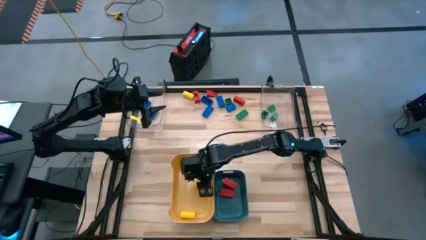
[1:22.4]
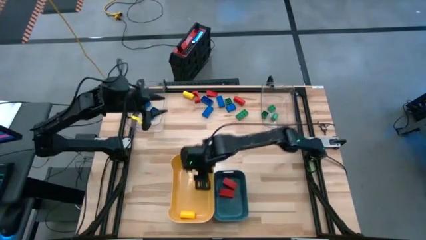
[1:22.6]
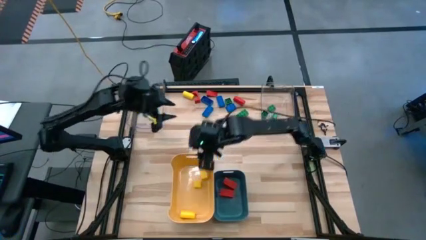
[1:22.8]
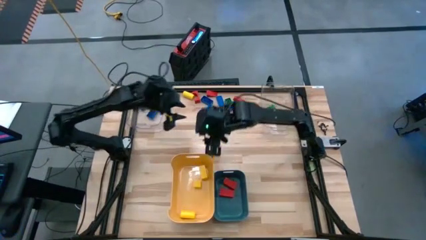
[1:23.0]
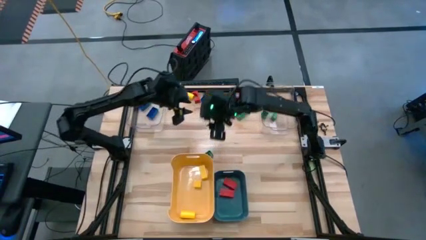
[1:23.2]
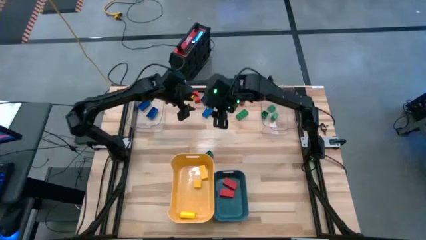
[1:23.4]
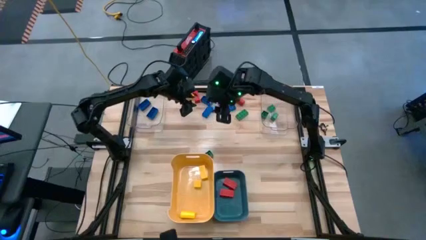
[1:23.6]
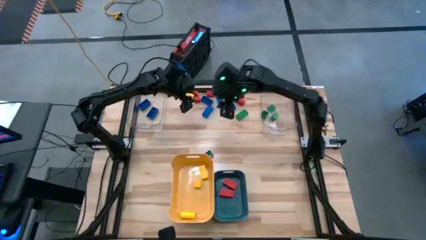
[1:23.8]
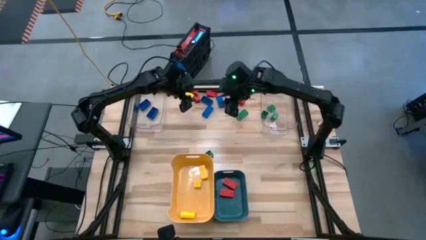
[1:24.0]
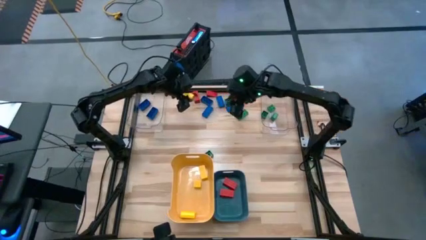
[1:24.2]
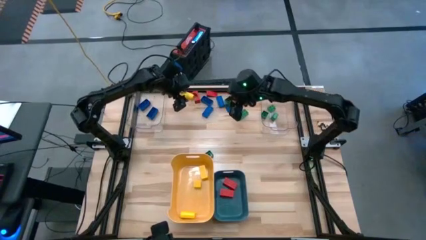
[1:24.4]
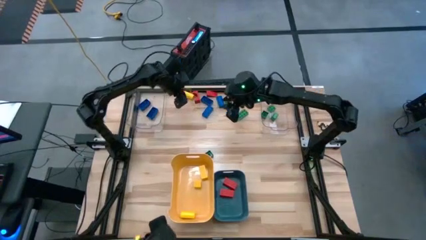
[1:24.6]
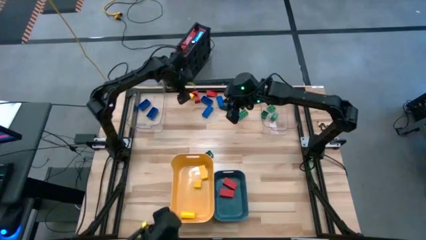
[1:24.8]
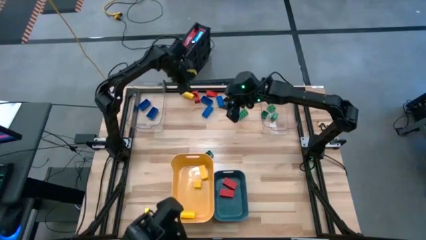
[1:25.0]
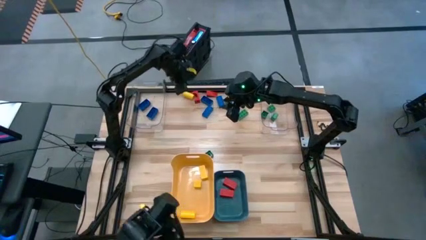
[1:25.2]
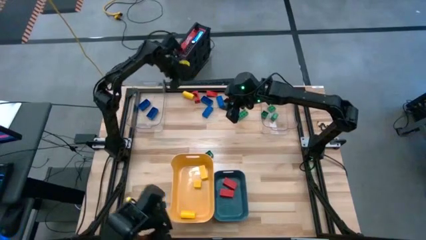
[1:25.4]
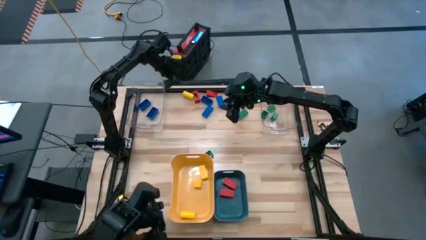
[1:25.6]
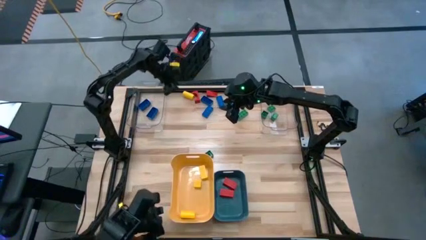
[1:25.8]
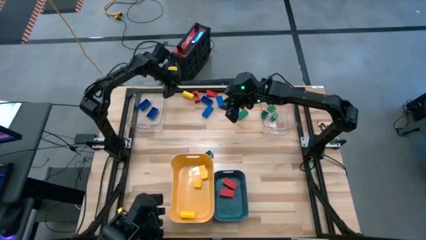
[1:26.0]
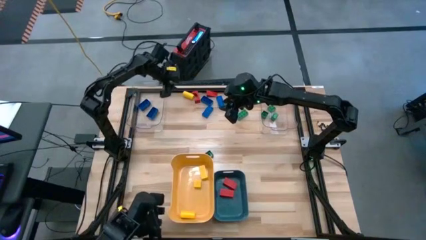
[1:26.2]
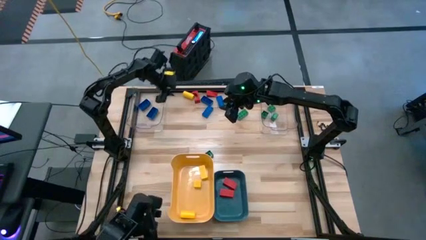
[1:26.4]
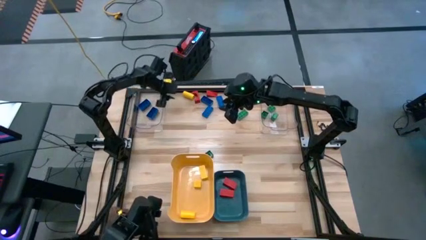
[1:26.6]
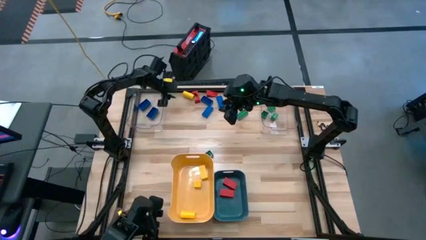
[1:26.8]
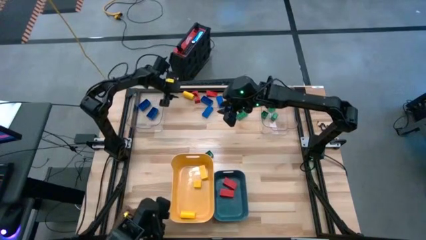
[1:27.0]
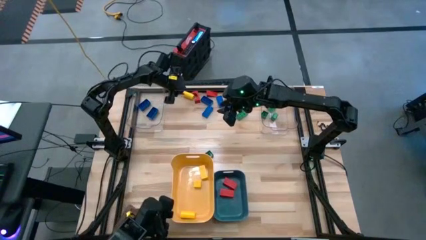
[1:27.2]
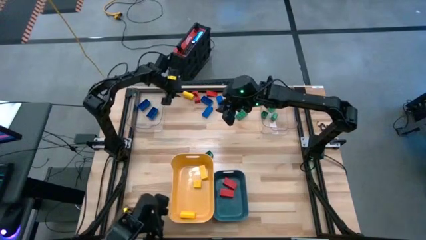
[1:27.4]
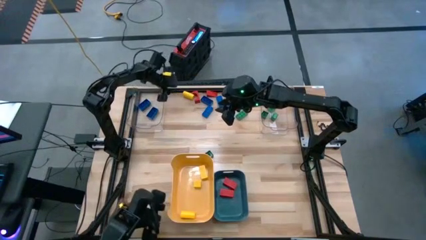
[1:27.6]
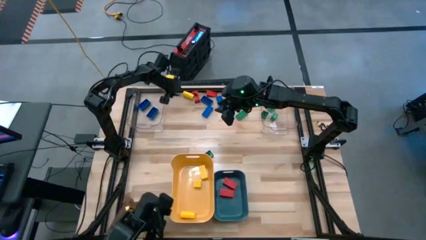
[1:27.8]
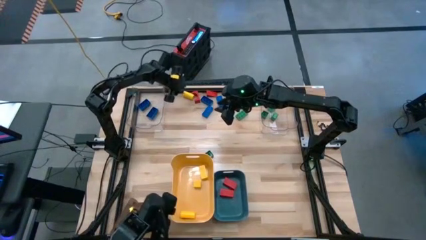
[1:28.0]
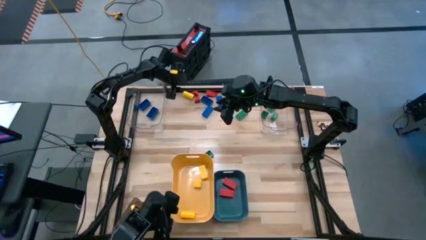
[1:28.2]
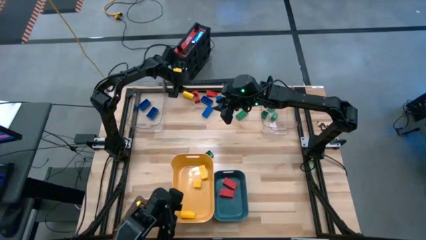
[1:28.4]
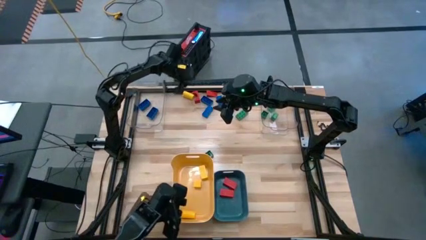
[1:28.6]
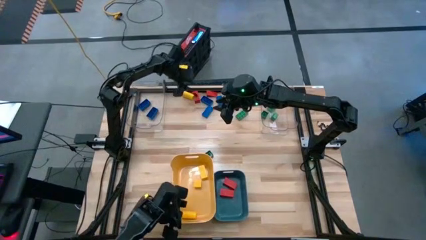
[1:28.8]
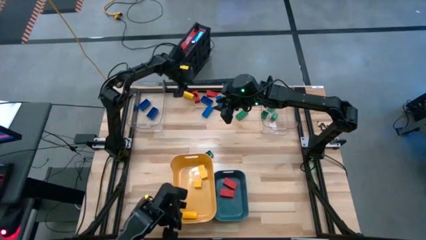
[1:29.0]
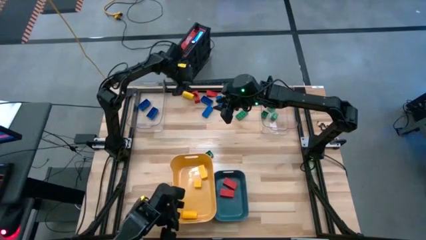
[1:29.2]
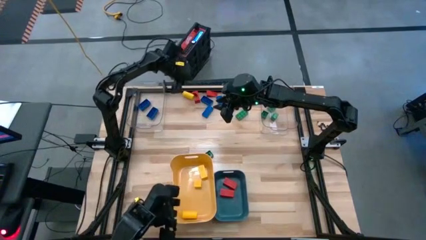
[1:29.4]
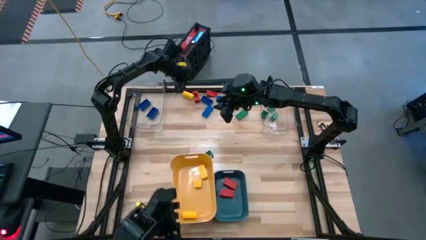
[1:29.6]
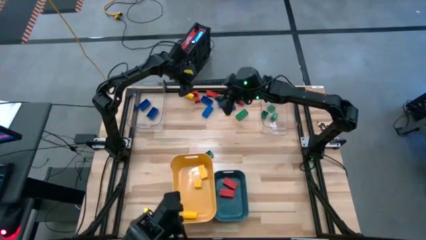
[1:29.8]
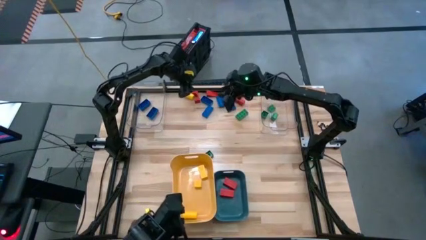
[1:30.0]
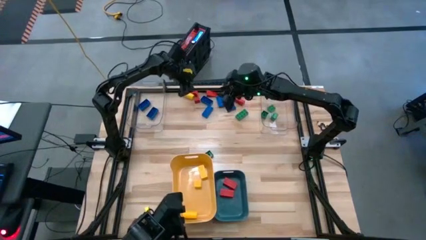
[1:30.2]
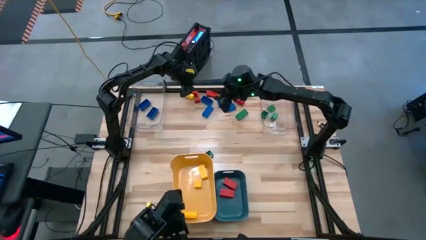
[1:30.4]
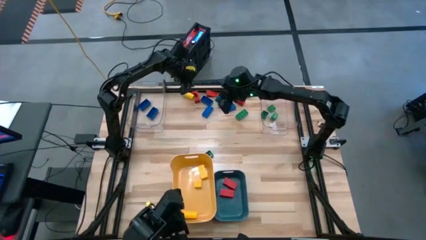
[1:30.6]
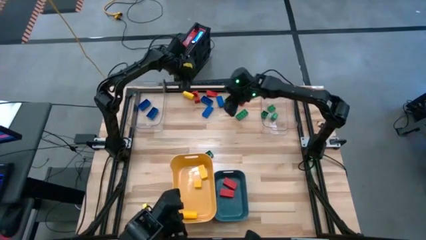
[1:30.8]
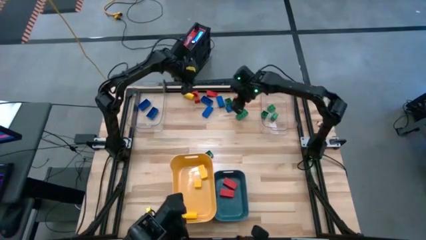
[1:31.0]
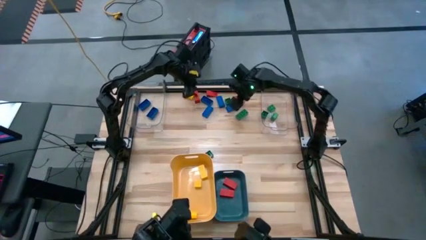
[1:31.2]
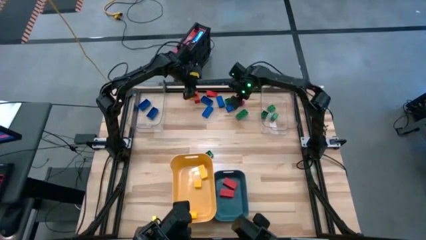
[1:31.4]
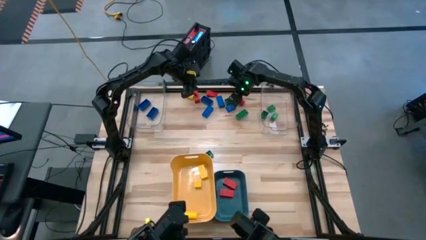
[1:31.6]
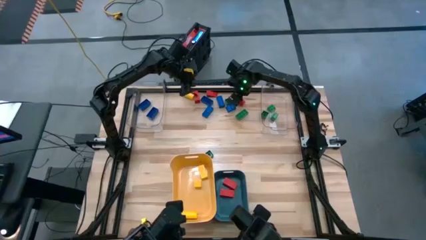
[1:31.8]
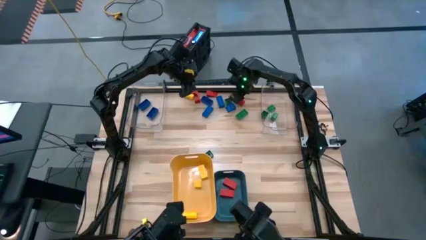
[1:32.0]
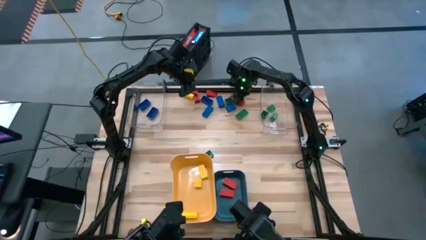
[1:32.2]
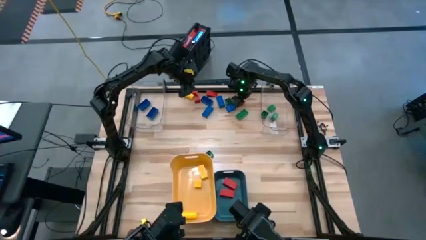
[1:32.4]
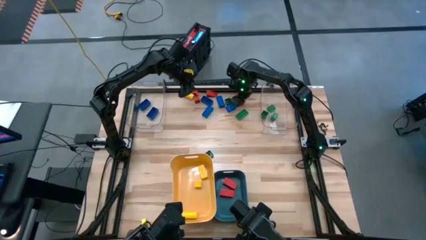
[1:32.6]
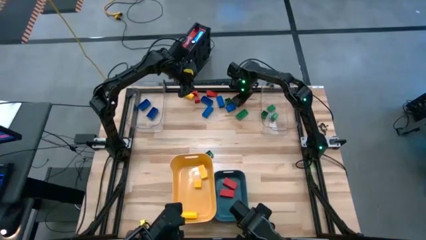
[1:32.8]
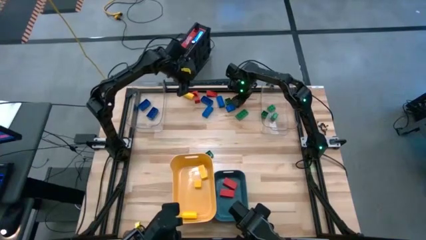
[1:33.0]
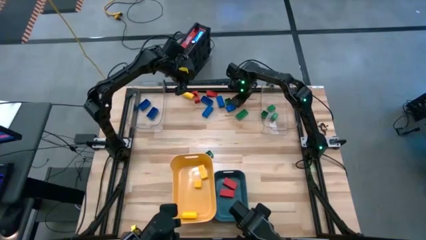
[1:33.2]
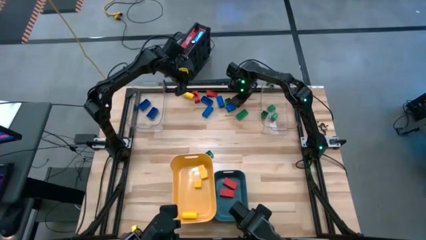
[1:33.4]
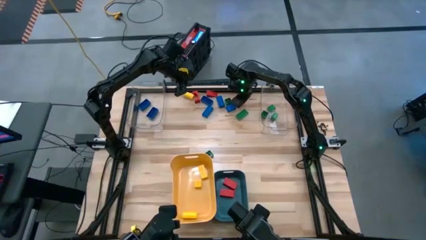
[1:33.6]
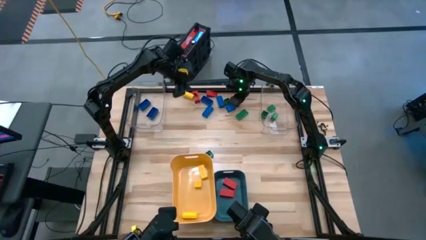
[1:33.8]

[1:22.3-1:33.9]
Task: Sort blocks
Put the red block into the blue bin

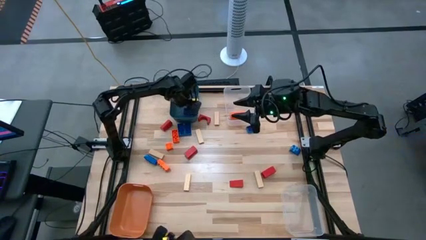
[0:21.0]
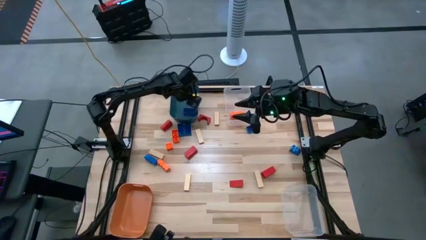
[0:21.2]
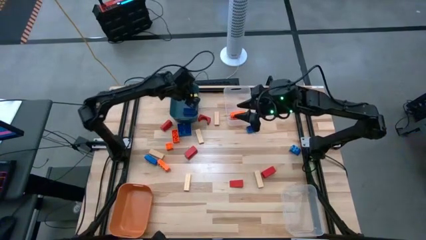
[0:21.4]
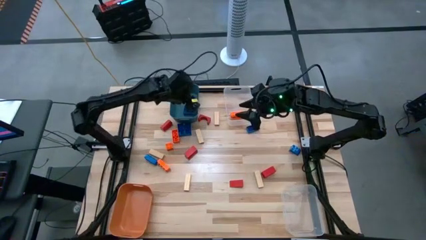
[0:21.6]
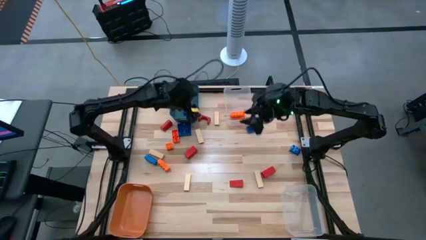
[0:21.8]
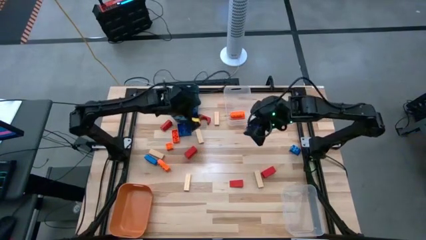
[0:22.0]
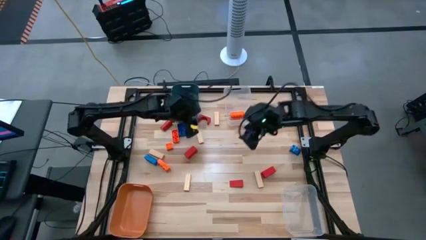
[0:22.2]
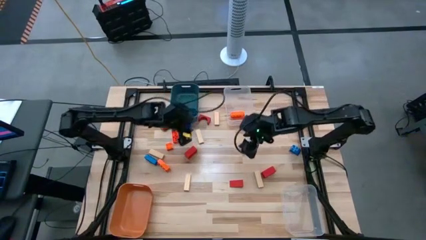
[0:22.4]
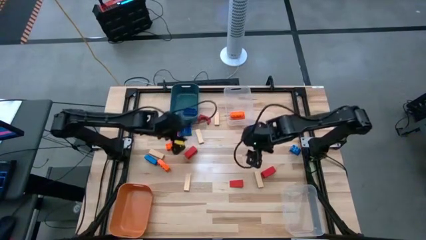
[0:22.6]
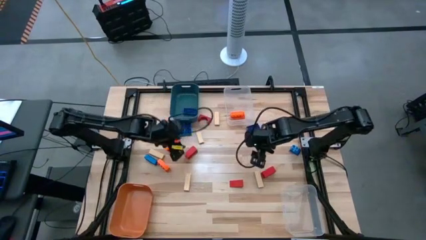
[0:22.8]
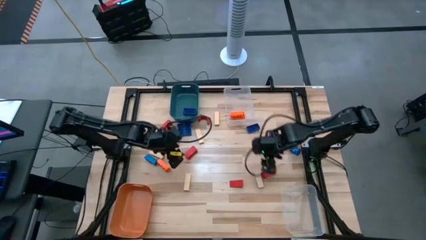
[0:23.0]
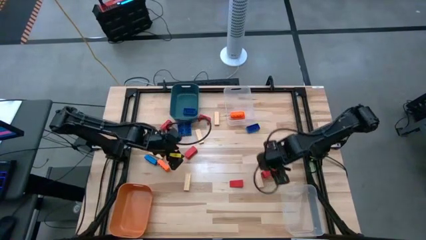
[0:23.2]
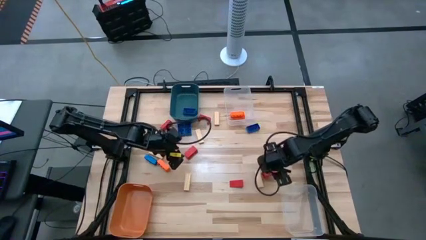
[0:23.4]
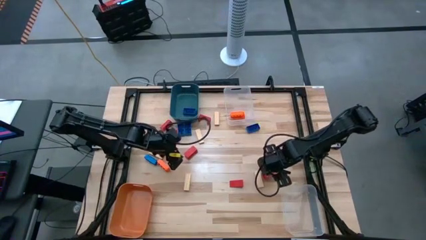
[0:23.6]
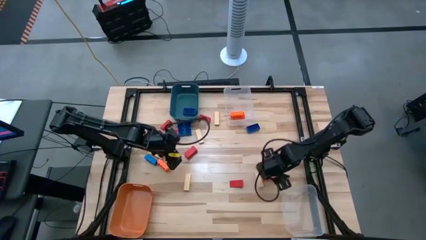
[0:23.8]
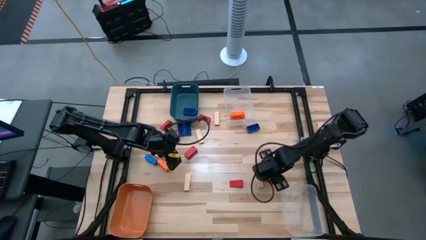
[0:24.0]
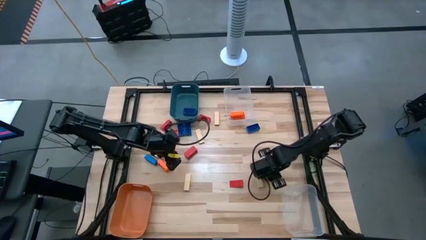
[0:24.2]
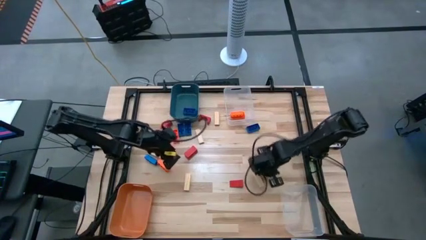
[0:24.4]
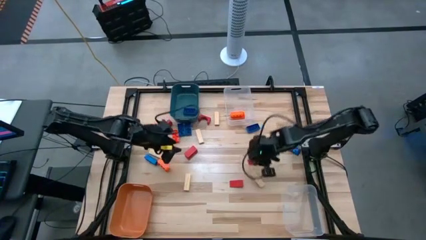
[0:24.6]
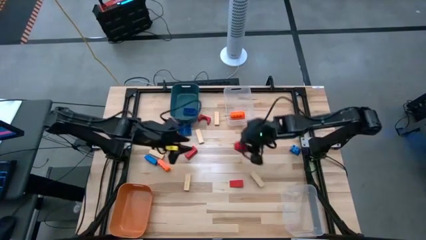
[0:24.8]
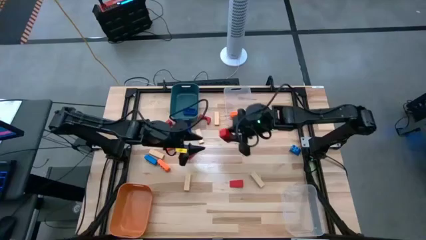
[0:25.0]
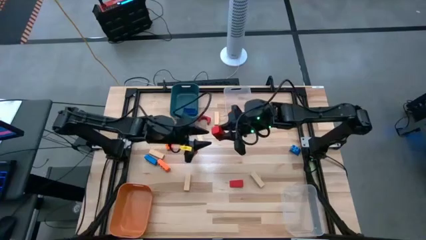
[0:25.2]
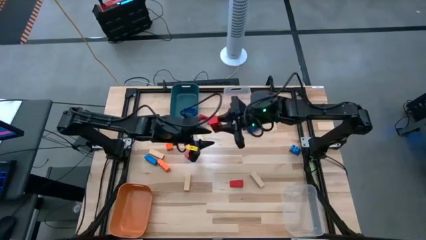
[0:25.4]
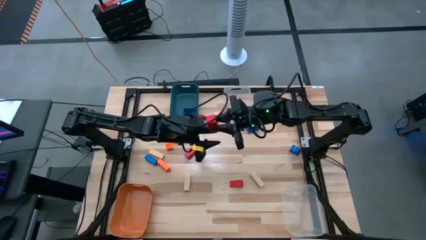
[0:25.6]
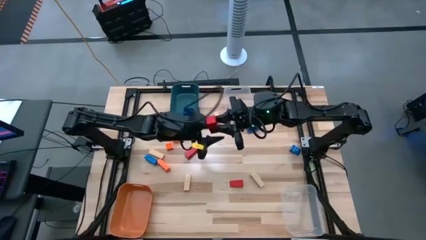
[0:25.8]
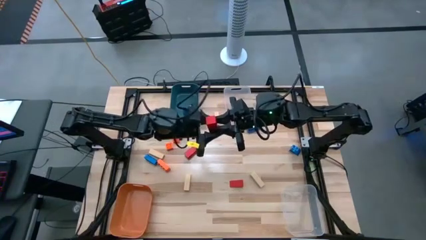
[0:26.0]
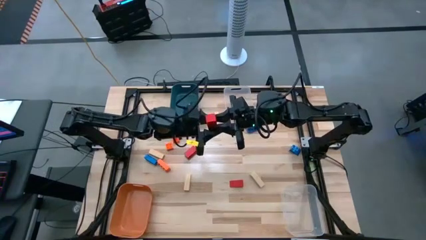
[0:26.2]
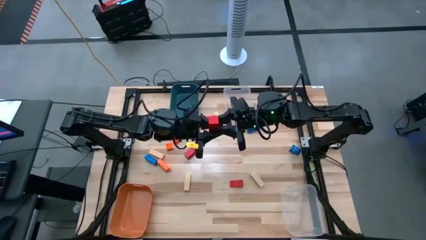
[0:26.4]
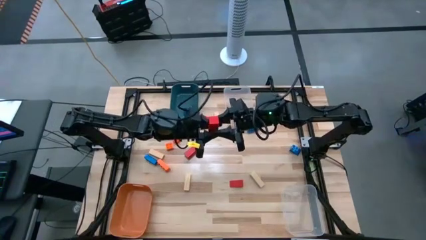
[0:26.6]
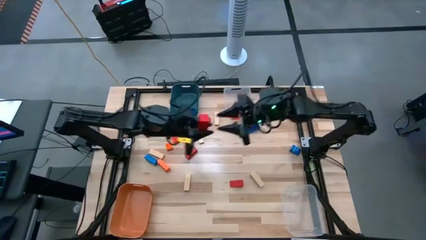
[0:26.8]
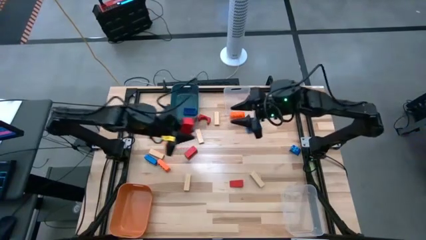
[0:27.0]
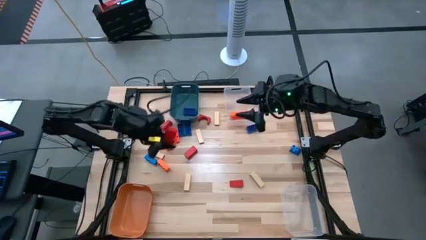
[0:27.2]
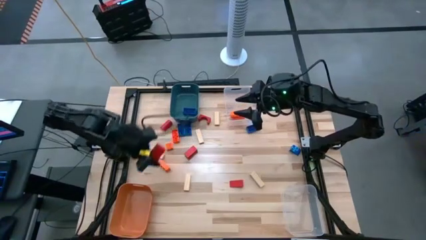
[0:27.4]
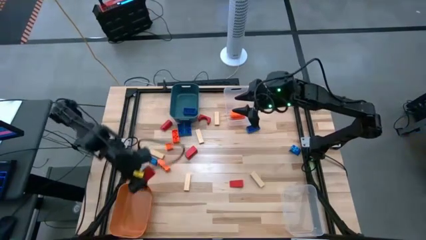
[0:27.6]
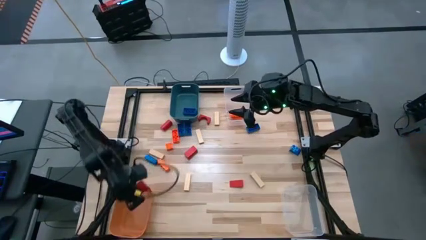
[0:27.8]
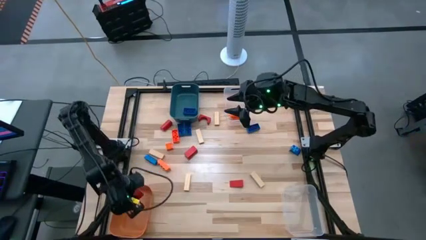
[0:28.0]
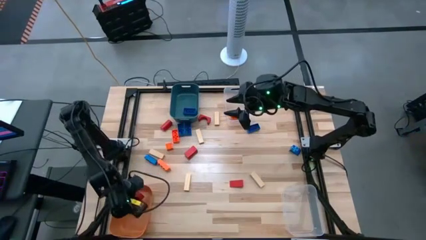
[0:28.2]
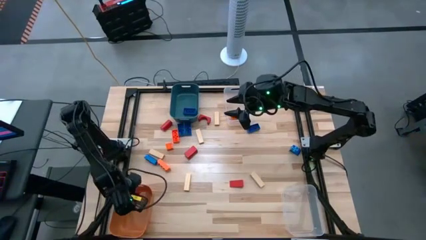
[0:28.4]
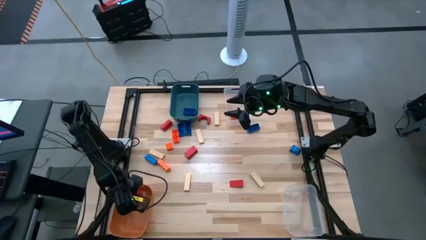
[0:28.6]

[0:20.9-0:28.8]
Task: Sort blocks
Put the red block into the orange bin
